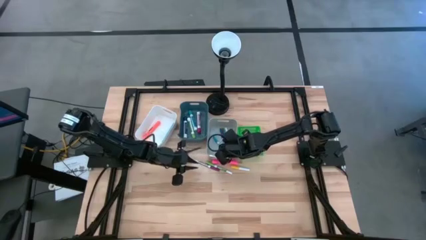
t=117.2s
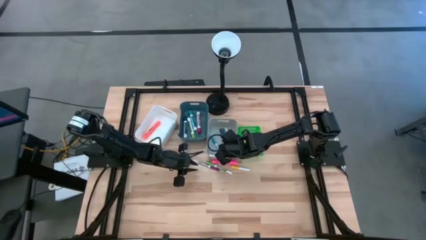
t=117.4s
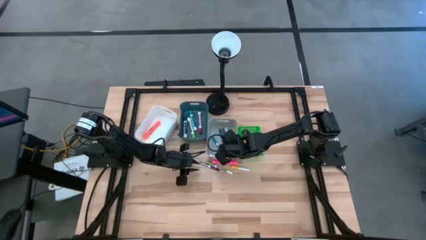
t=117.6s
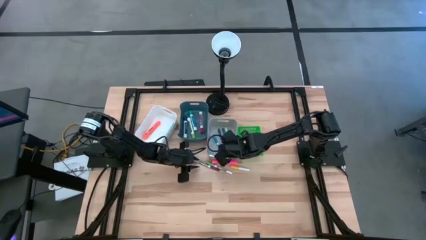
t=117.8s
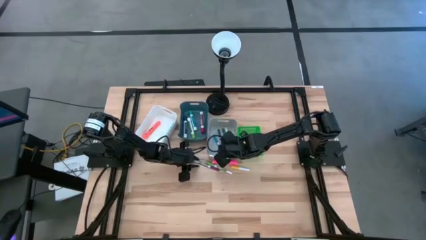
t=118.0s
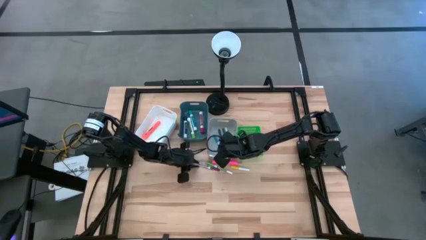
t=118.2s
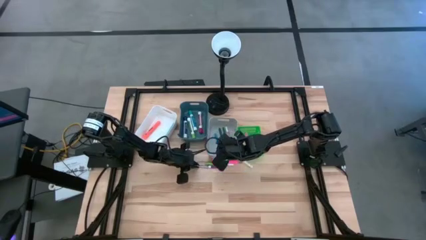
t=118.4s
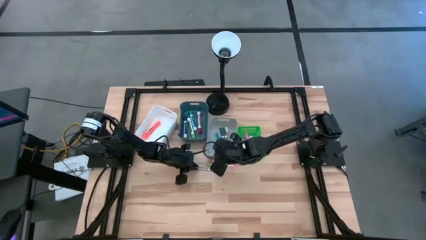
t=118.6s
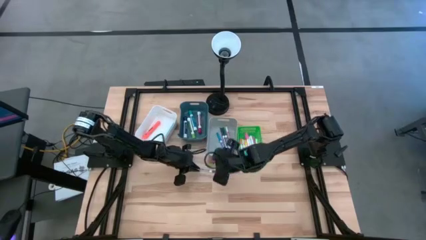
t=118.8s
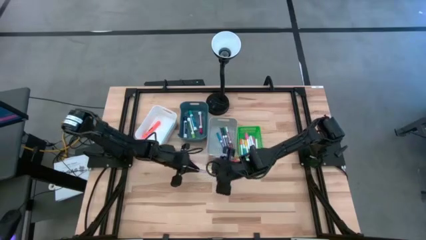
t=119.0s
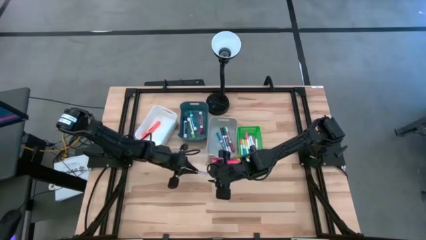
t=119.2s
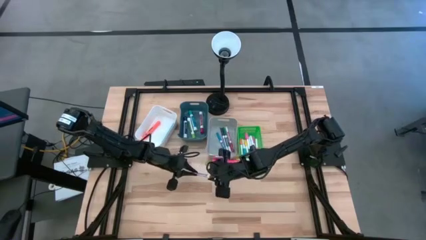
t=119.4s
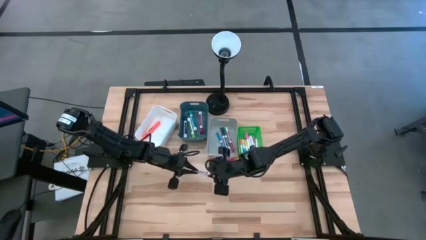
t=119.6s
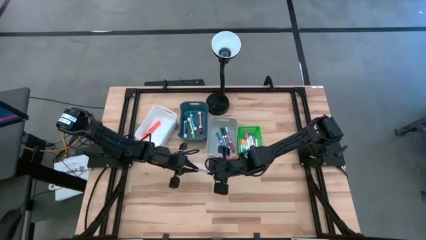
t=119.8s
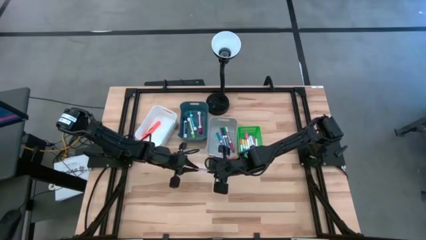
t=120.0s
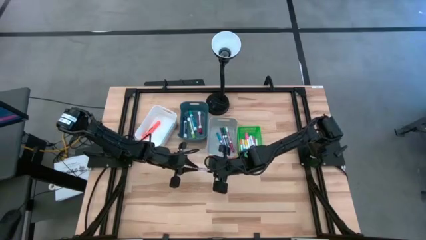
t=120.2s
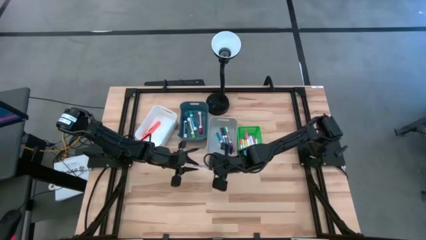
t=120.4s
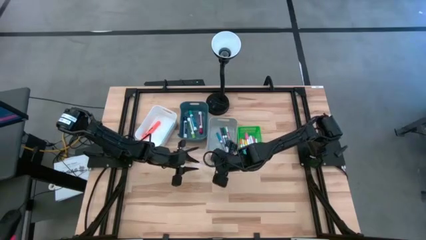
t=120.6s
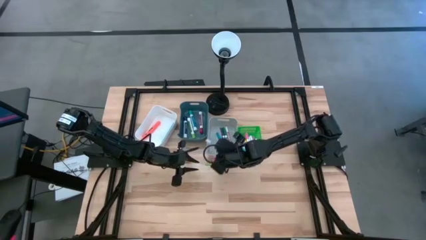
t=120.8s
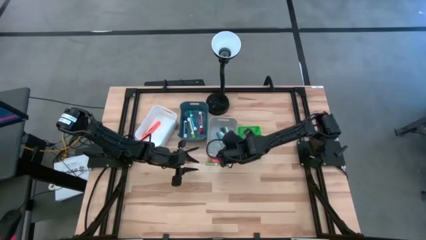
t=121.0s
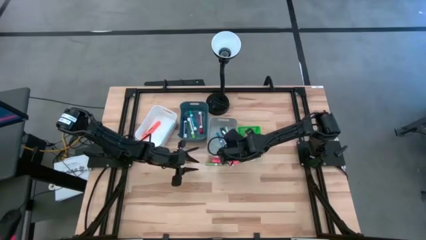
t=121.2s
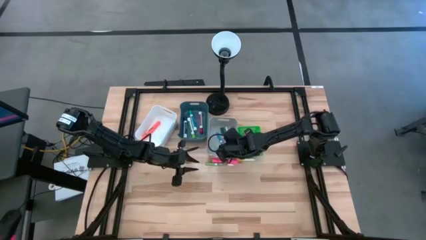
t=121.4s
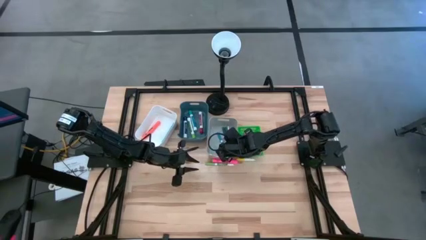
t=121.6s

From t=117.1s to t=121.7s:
Task: Pick & Place Markers
Put the small dark red marker pen into the gray bin

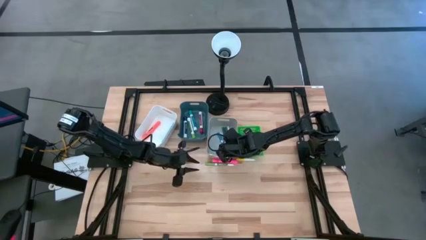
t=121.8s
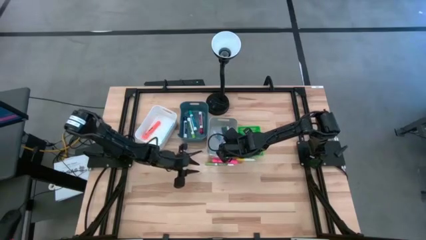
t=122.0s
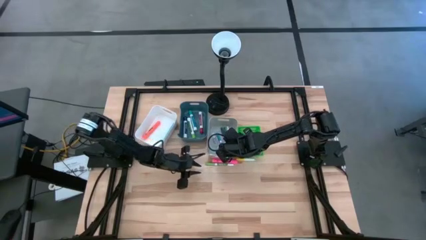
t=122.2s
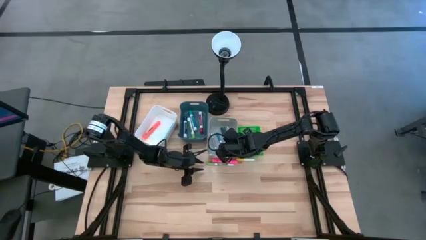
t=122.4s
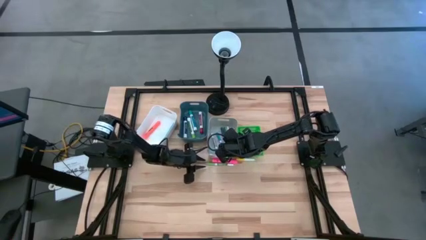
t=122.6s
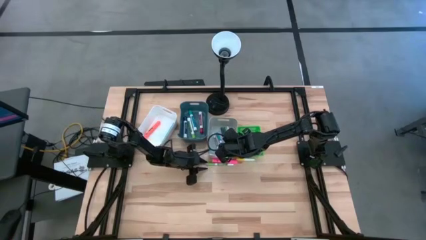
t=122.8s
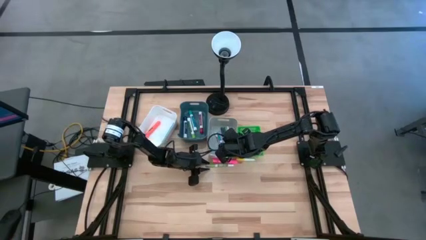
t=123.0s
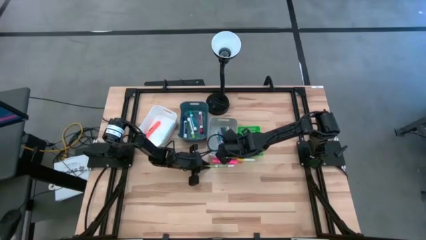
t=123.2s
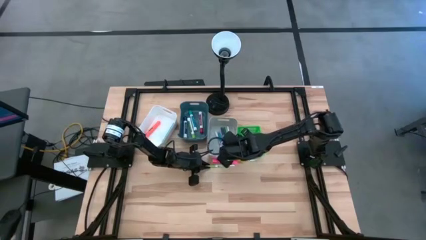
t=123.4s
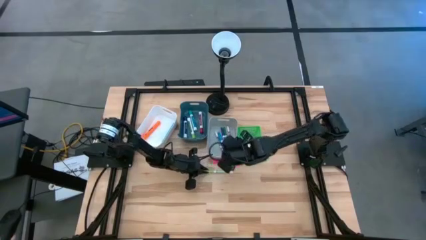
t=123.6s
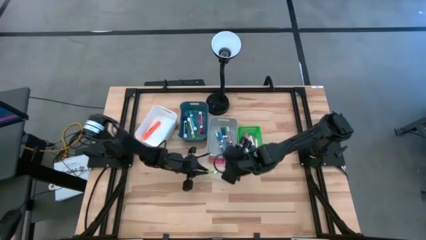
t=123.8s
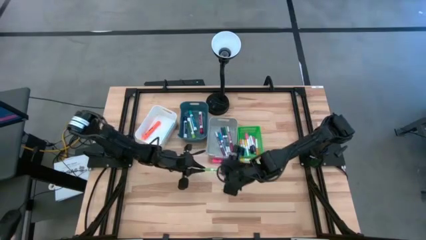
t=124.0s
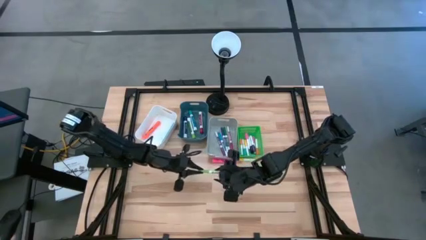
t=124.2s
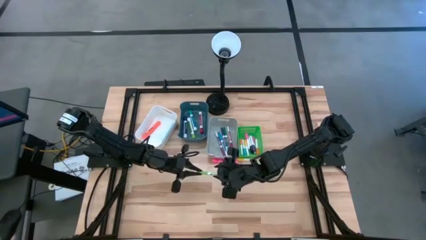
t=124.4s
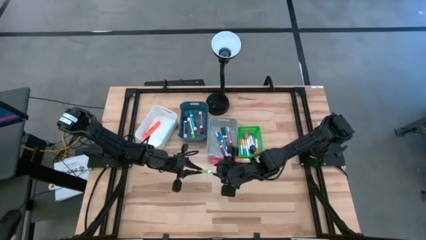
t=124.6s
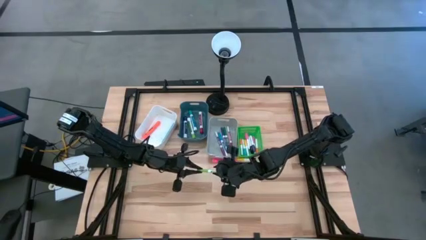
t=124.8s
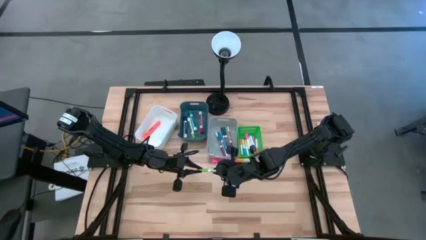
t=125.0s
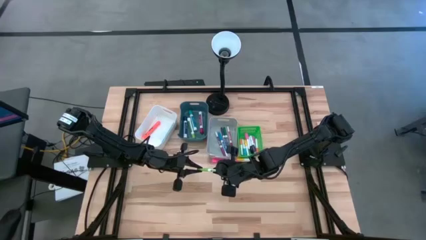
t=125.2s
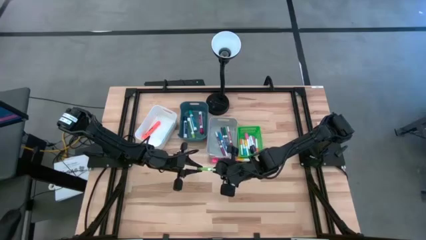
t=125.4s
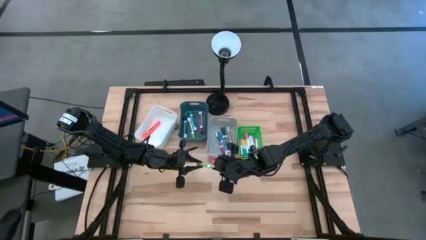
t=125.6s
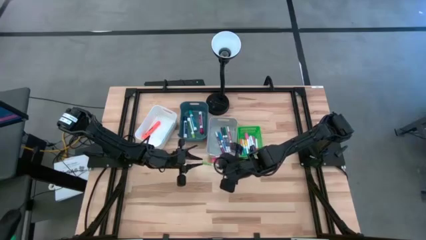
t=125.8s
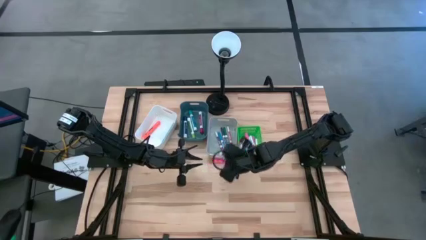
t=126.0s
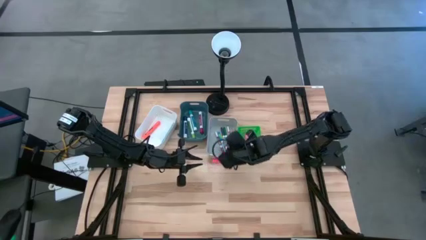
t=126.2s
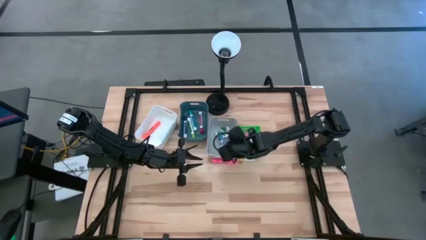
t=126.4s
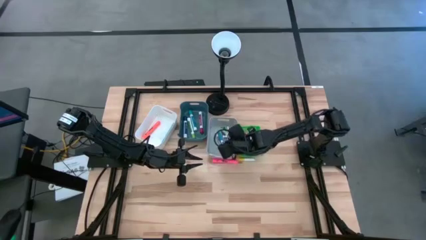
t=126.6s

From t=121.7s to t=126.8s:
Put the small green marker pen into the gray bin

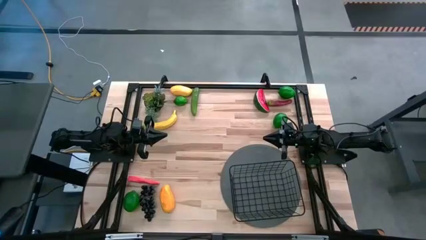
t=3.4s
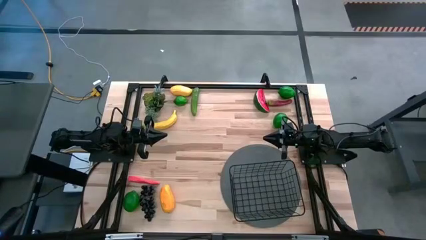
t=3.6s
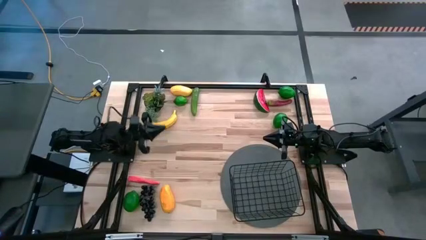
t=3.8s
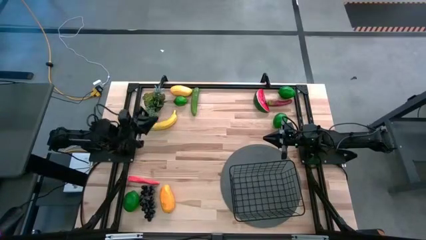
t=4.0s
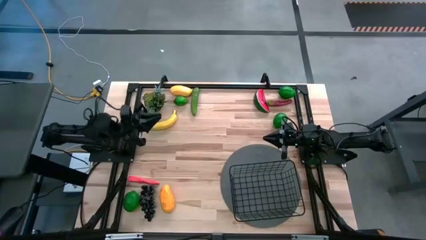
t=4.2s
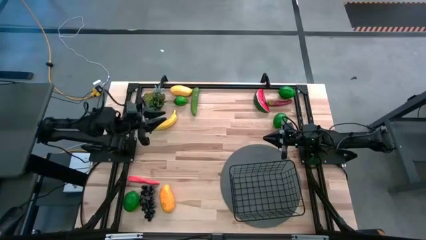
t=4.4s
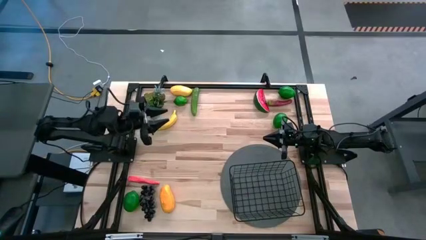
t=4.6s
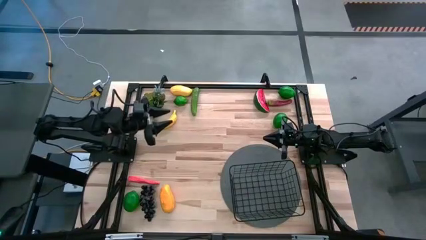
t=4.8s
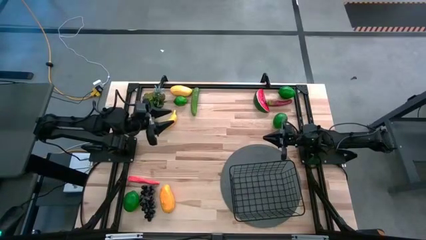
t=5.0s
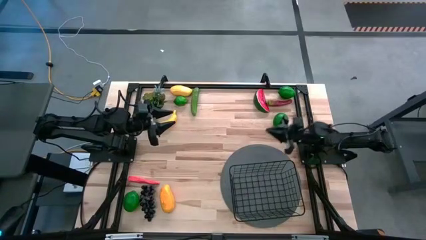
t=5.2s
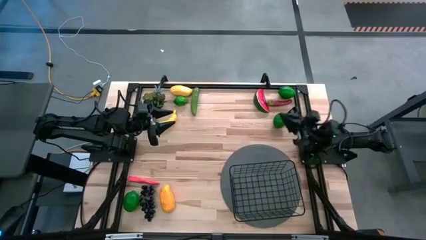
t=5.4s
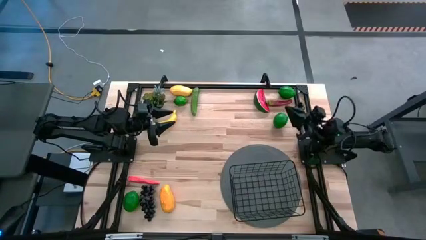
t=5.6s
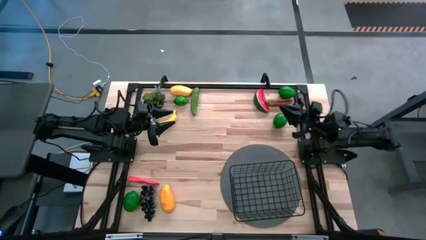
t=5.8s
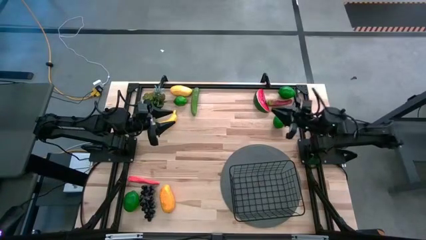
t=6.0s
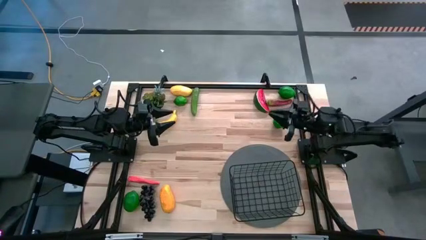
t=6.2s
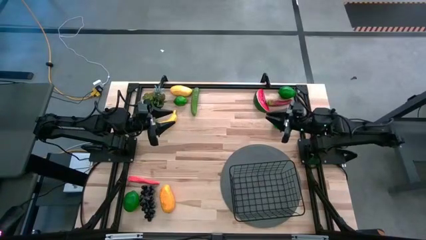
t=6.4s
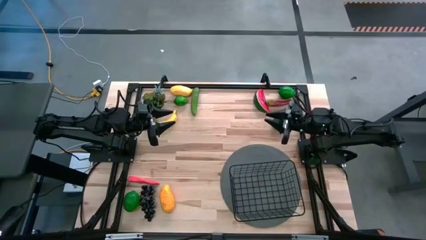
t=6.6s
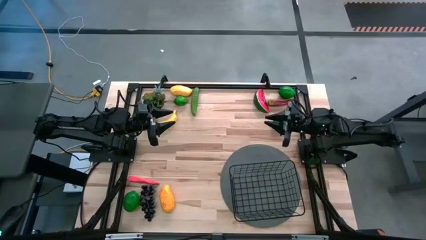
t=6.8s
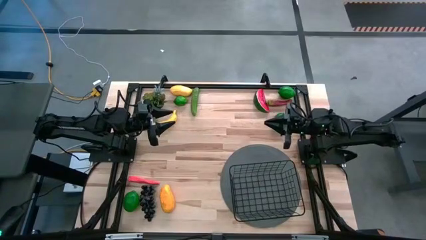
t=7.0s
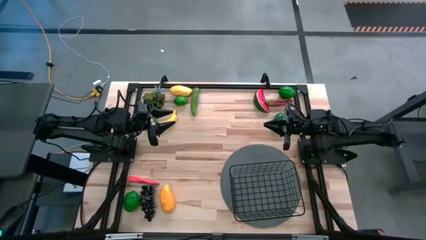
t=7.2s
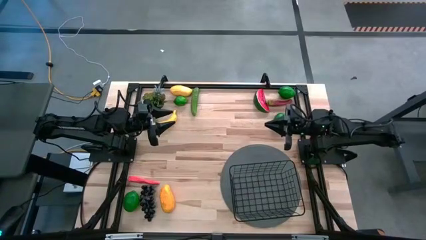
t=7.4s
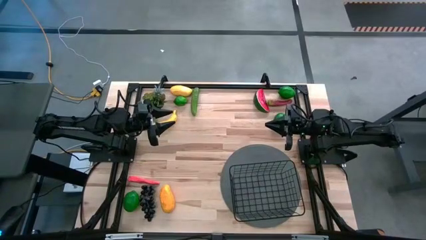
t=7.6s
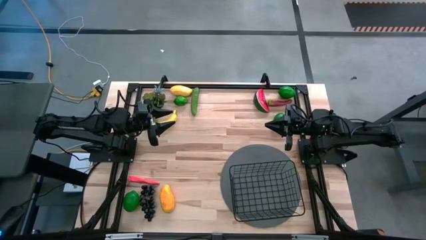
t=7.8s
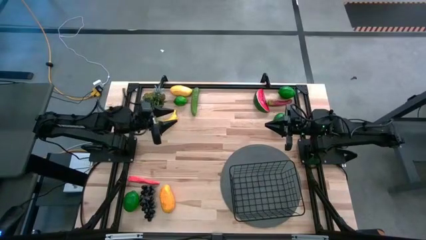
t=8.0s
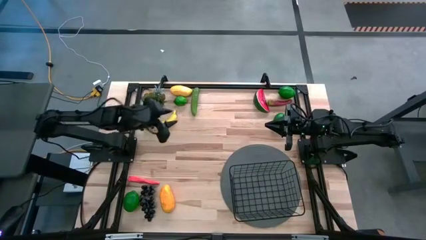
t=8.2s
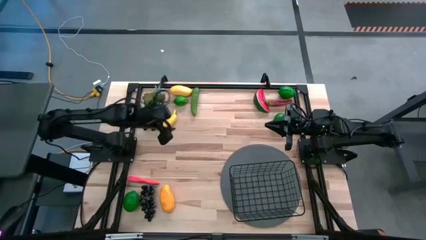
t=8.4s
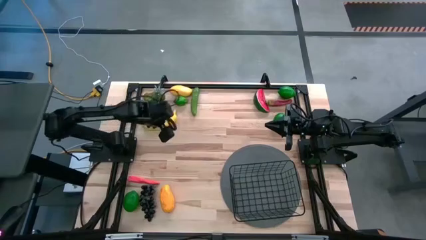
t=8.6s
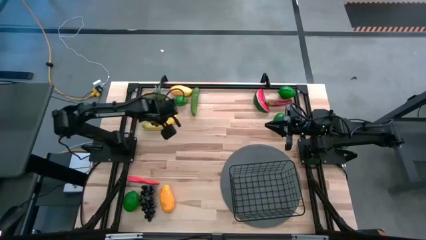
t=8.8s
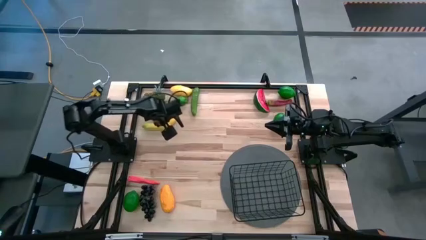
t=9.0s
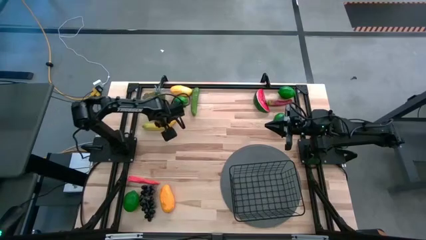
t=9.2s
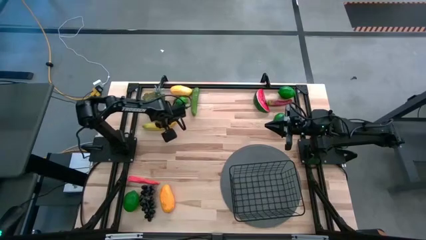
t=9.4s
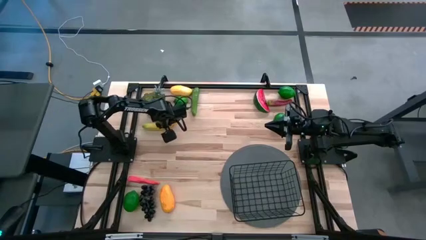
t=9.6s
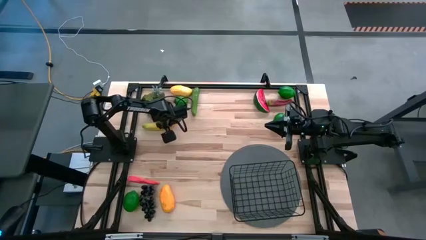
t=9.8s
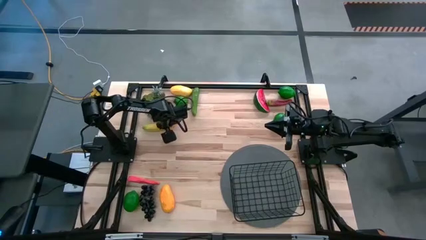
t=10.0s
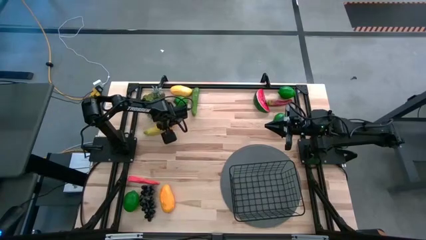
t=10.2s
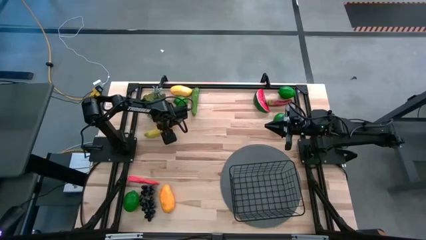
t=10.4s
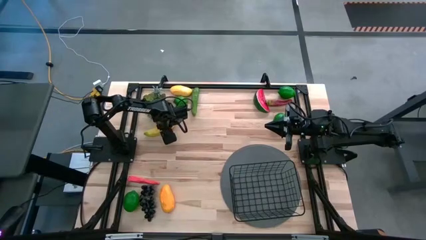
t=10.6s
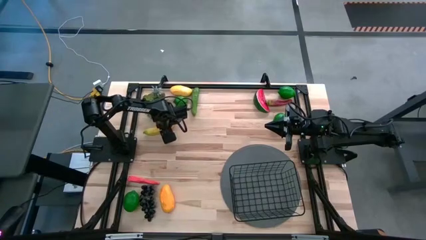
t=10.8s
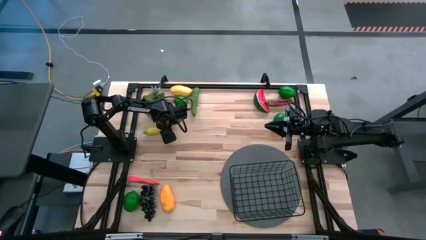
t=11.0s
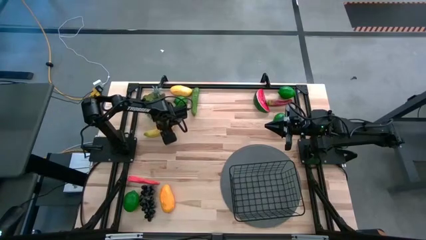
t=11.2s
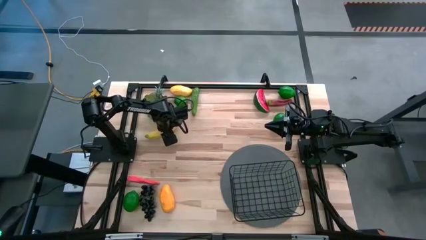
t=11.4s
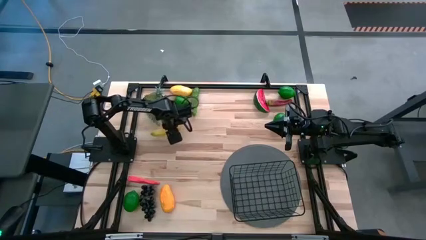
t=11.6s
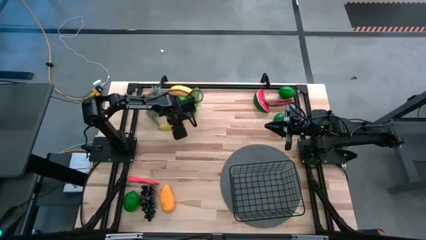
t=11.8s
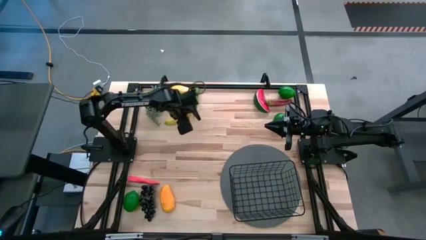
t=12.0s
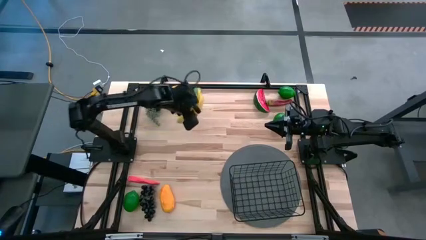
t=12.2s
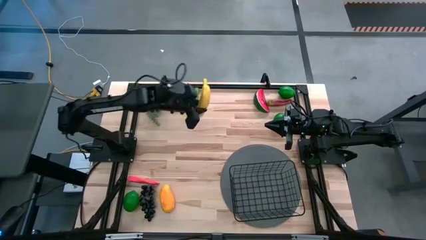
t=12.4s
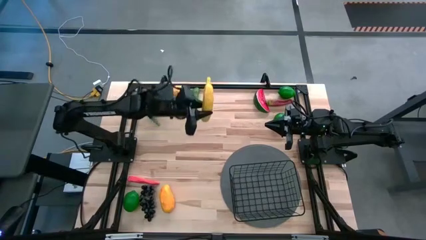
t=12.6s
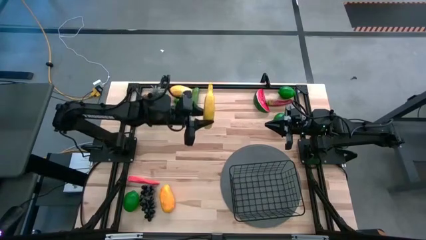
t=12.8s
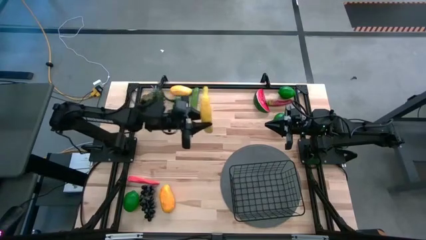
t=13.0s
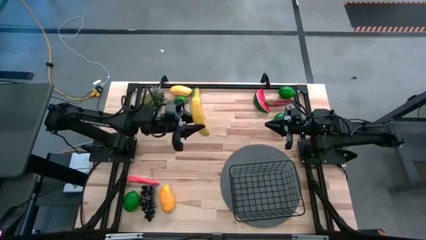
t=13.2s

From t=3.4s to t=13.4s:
Task: Build produce basket
Put the yellow banana into the black basket
